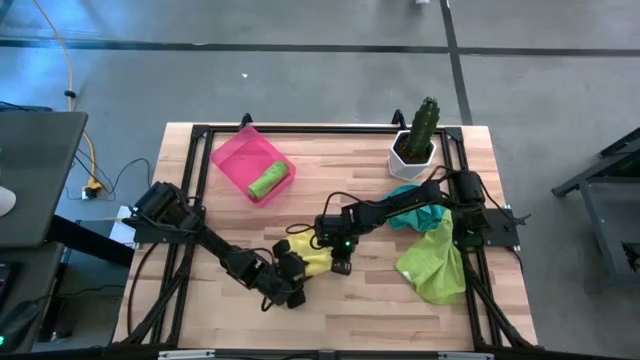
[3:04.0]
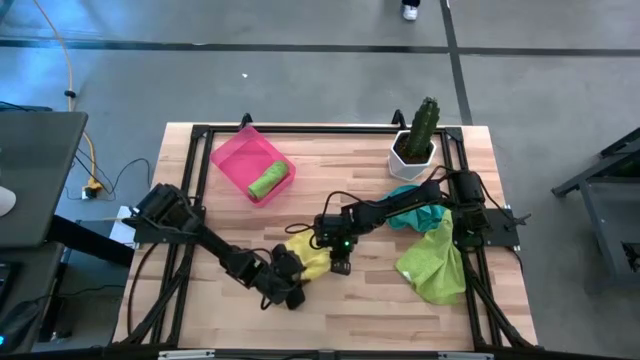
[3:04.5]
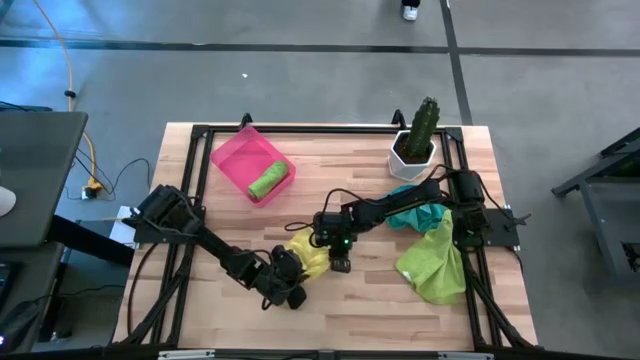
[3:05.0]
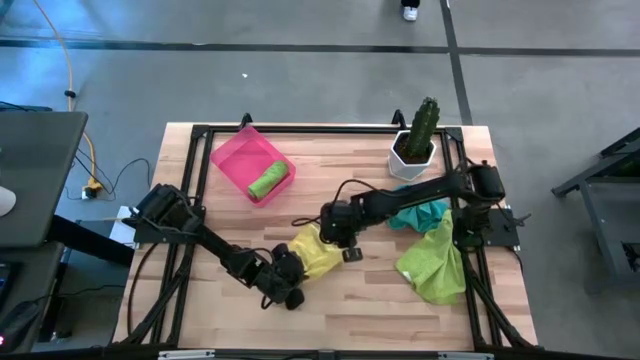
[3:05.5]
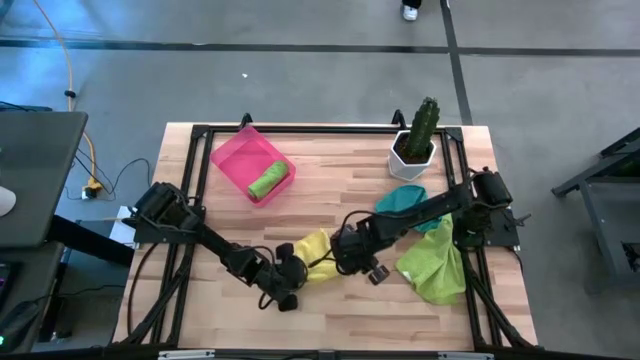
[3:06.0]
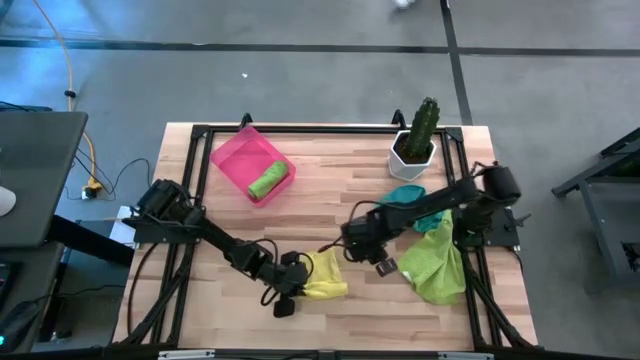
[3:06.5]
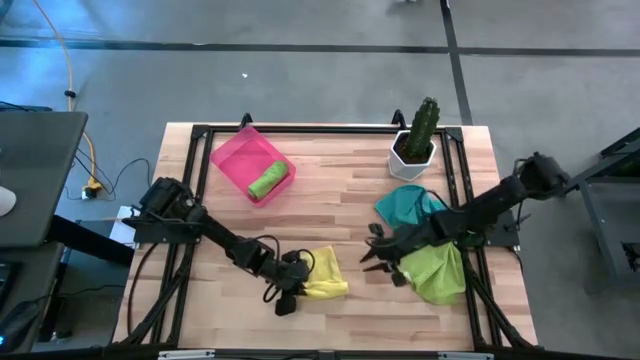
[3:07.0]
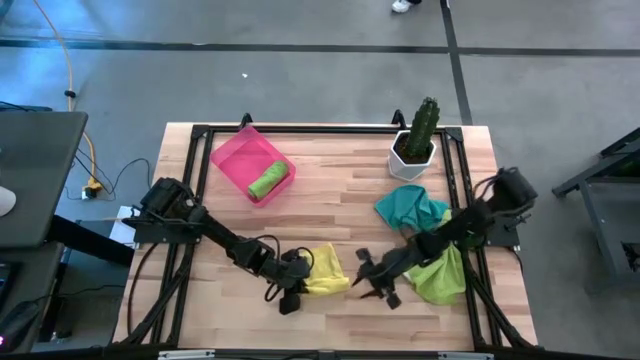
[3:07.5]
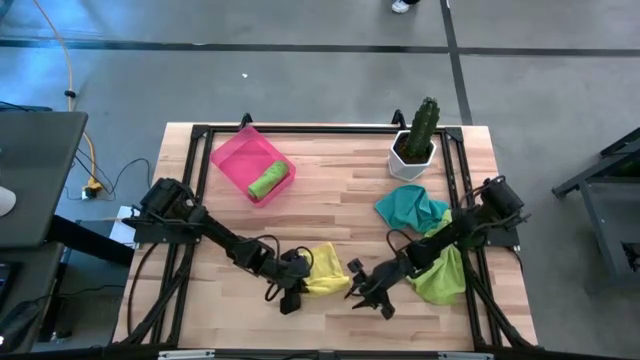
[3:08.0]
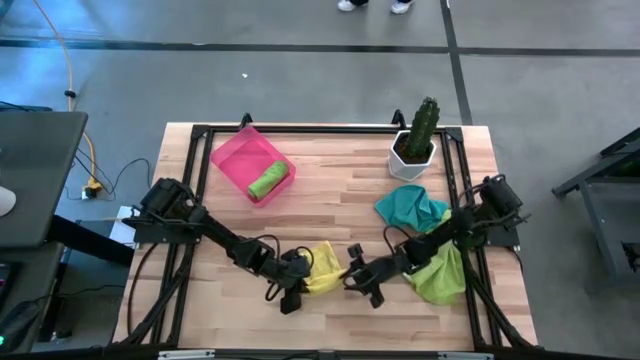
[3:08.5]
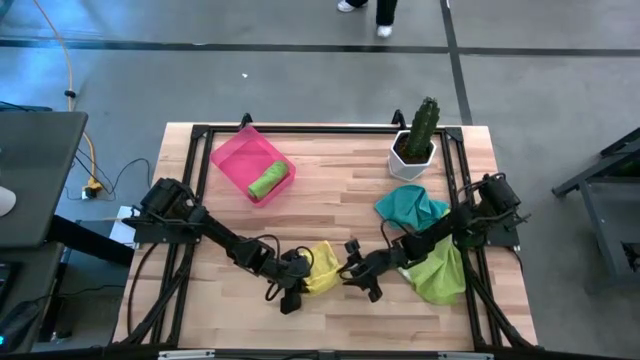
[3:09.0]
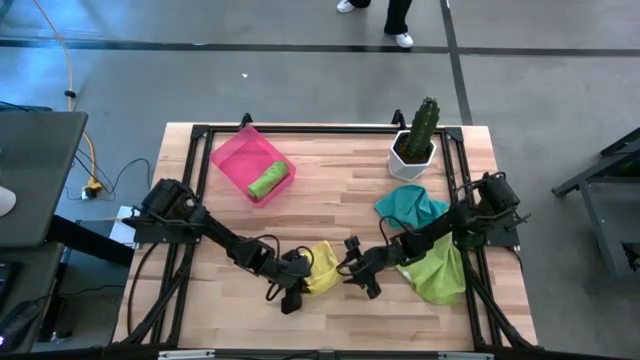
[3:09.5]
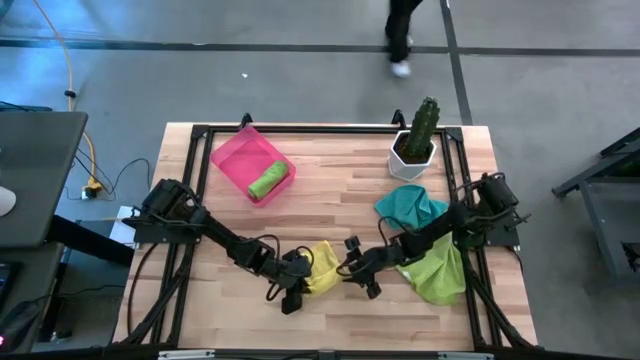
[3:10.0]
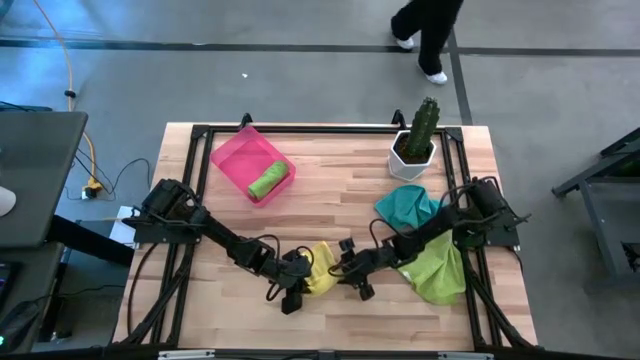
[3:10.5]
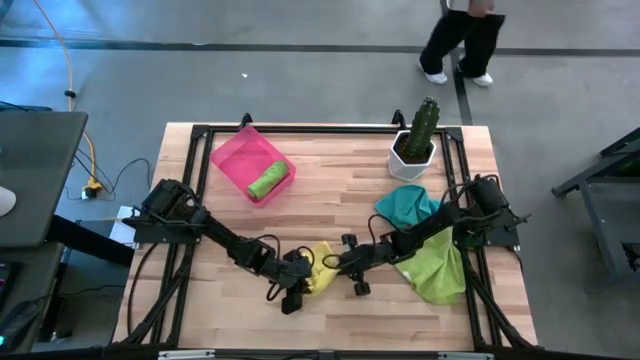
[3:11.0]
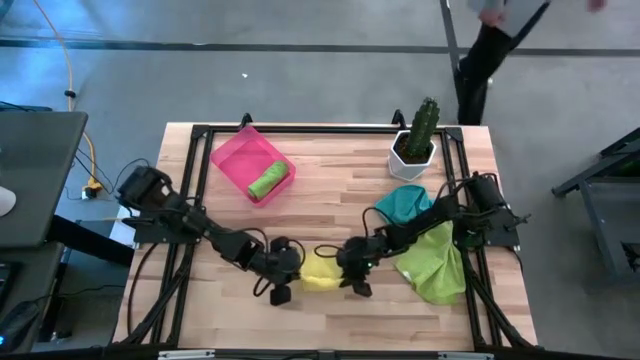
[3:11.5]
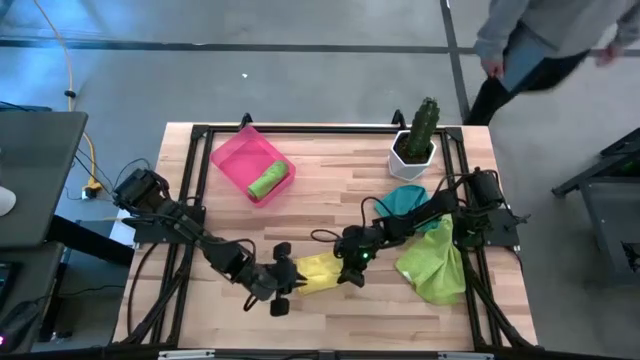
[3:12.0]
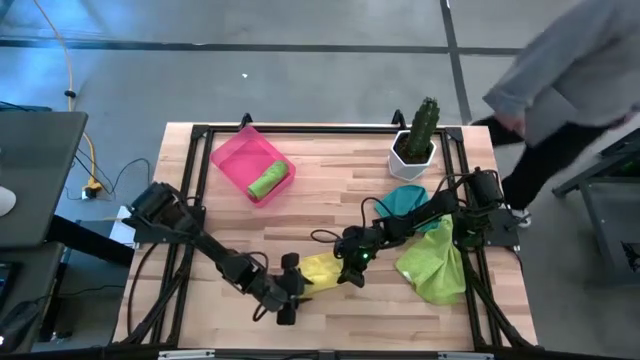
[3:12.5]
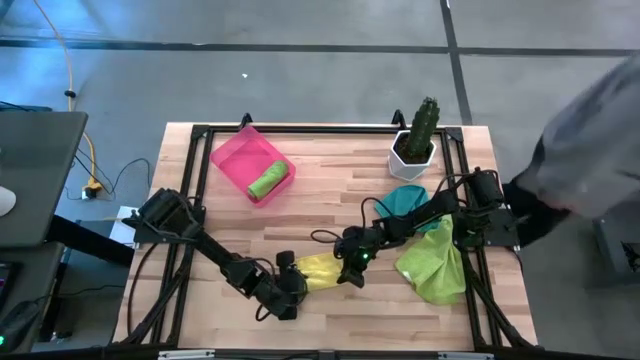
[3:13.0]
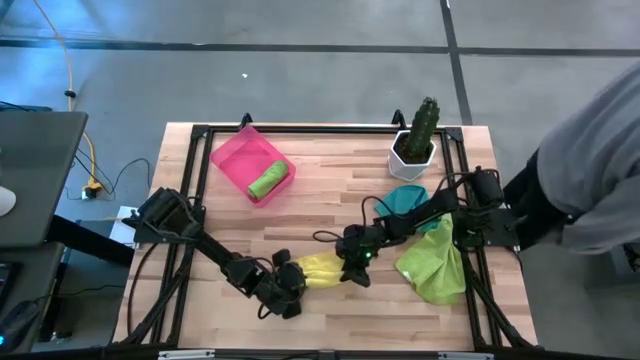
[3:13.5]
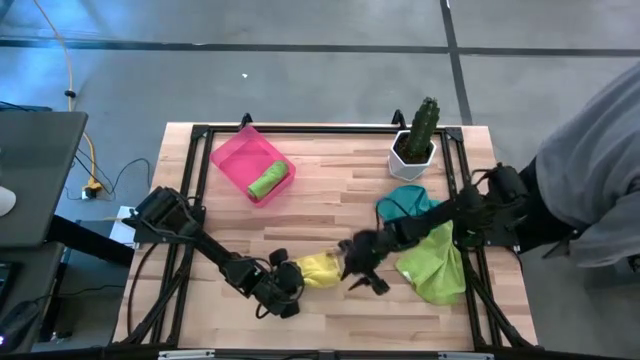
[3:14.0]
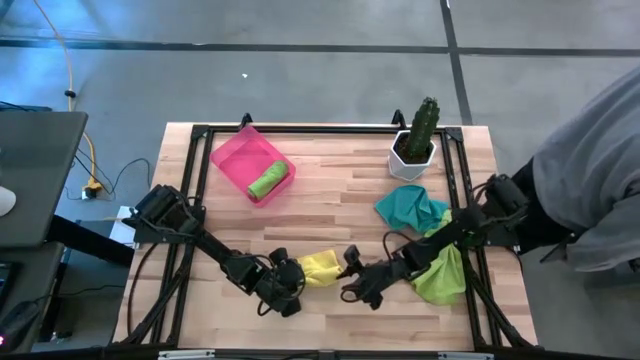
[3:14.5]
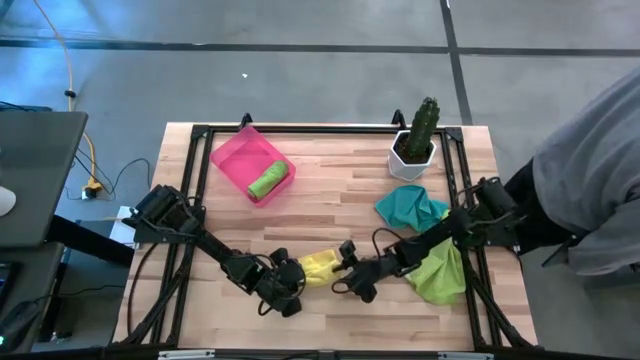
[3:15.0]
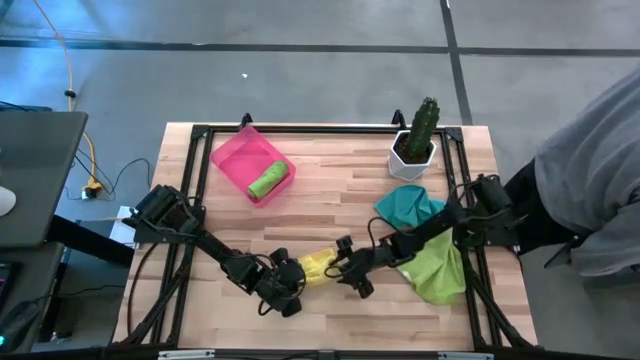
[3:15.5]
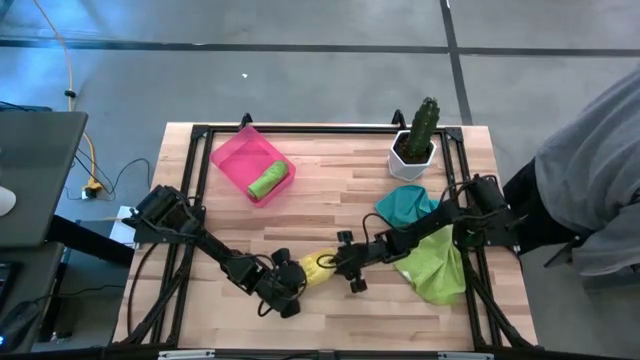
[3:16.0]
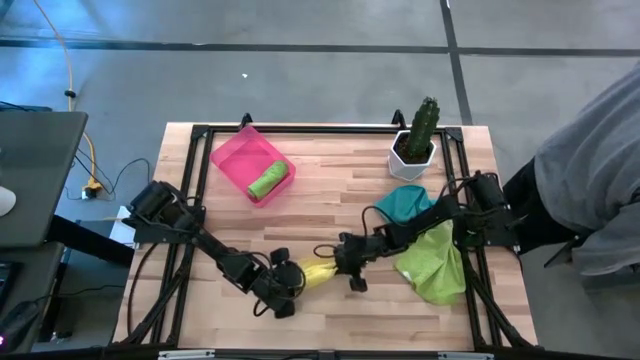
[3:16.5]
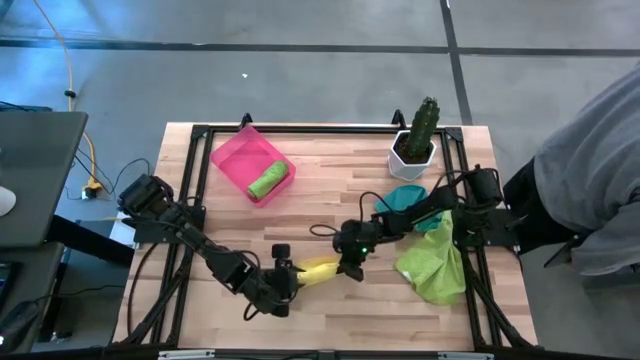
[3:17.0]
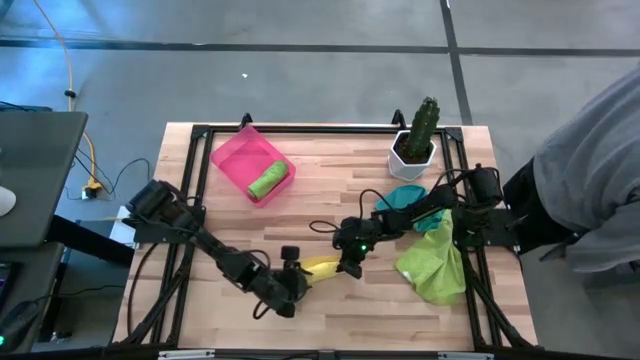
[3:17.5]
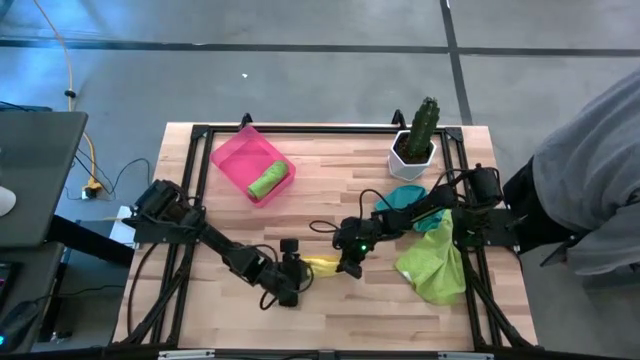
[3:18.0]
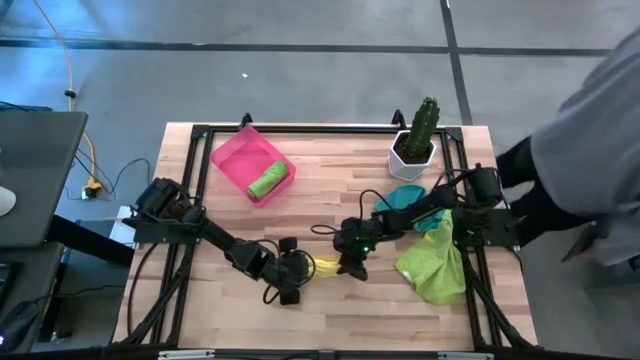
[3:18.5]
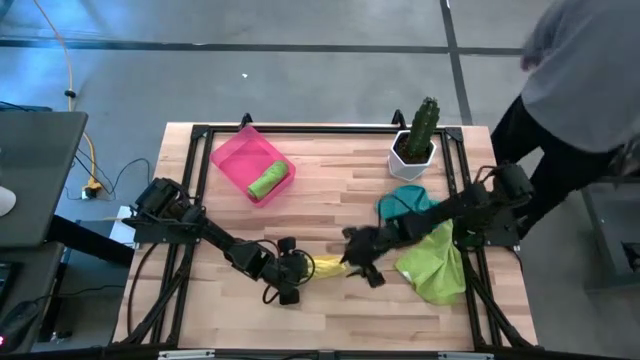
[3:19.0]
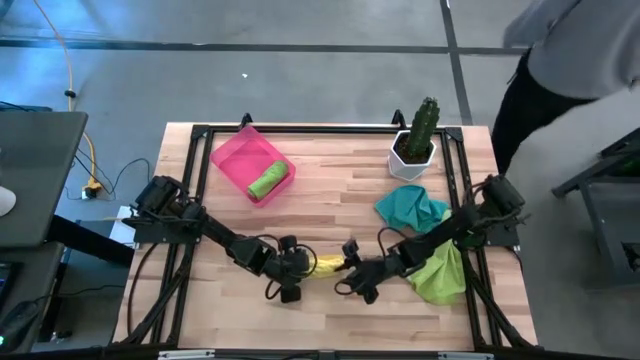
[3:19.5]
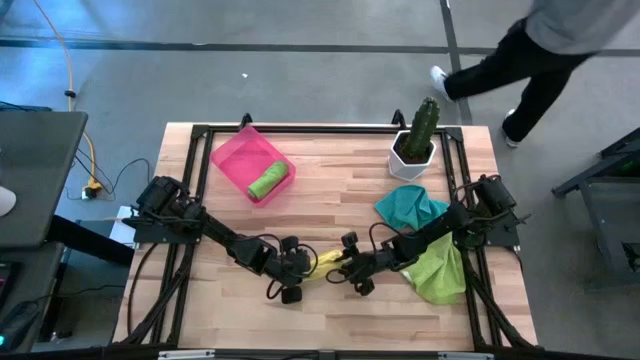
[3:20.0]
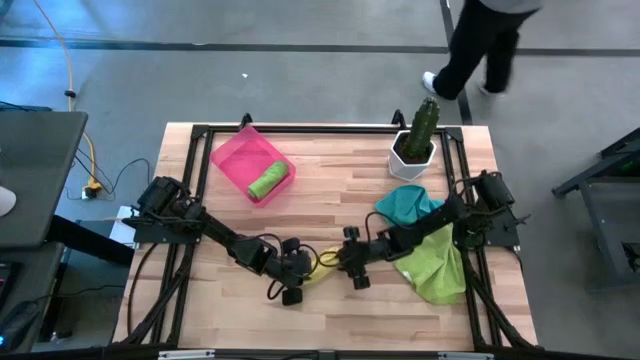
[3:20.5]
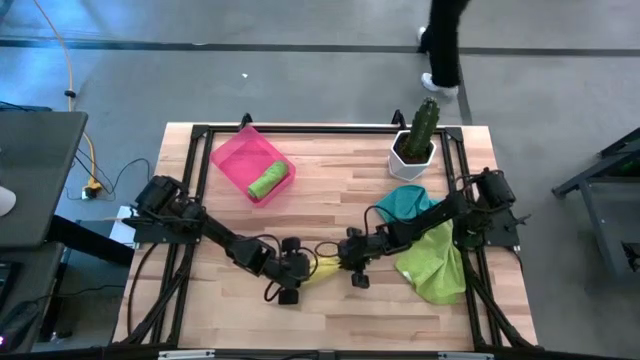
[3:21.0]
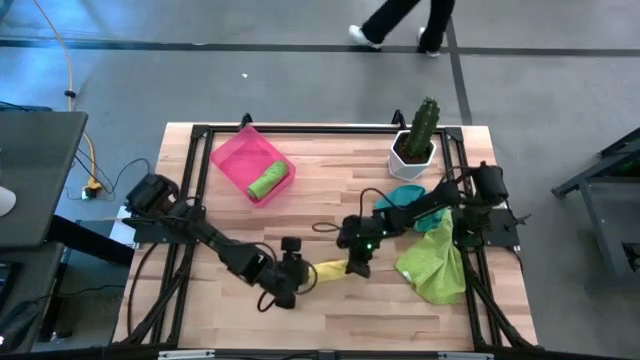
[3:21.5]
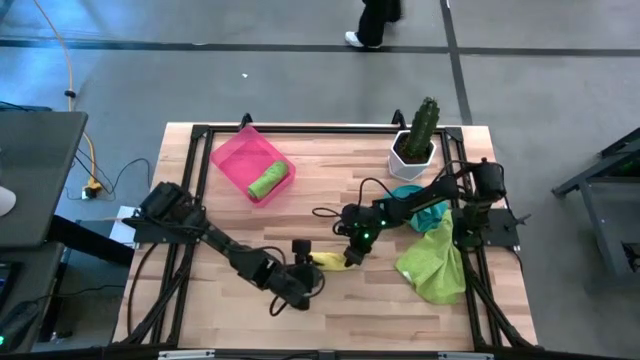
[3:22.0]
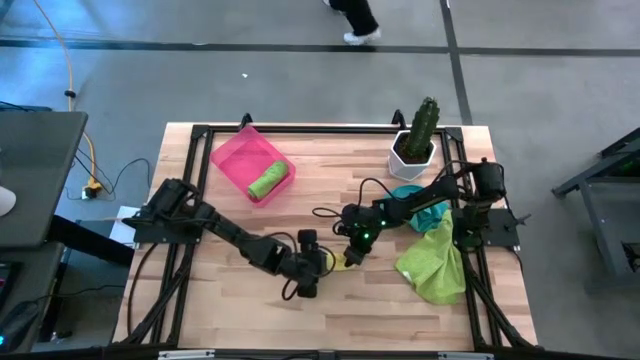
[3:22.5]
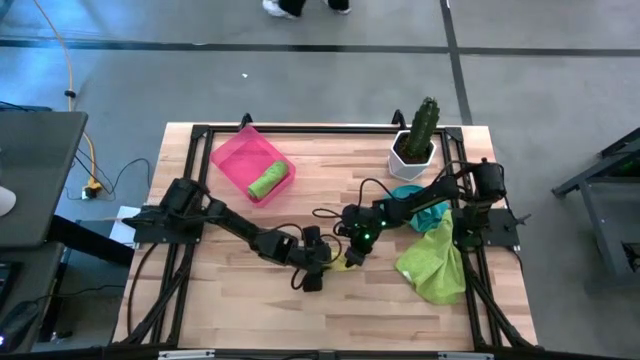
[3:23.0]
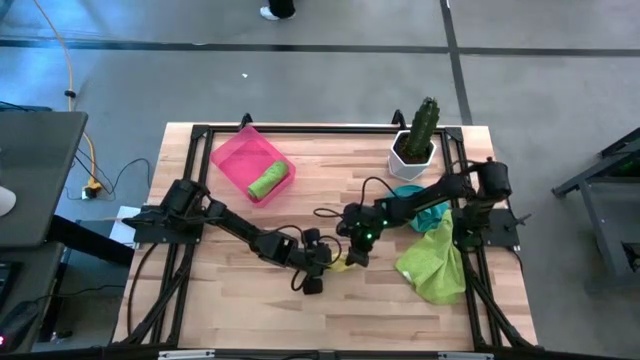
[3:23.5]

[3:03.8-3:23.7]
Task: Roll microfiber towels into tight, uniform cylinder then place into a basket
Roll the yellow microfiber cloth

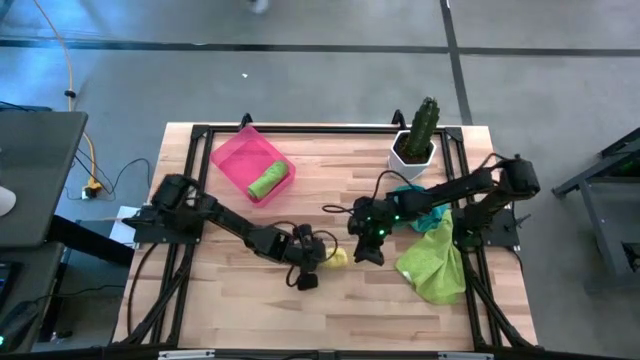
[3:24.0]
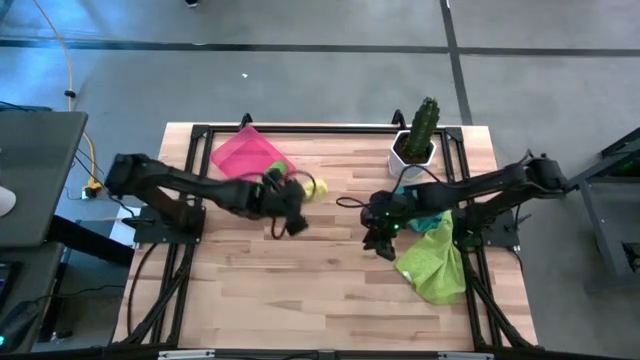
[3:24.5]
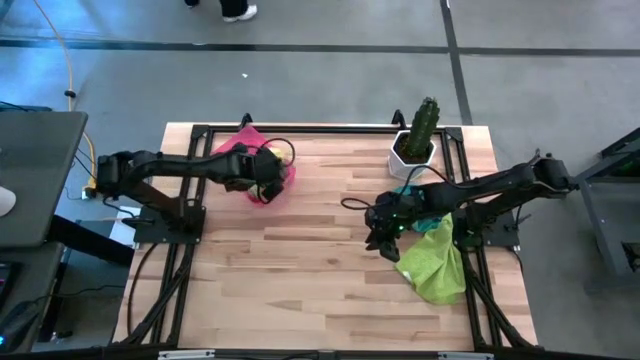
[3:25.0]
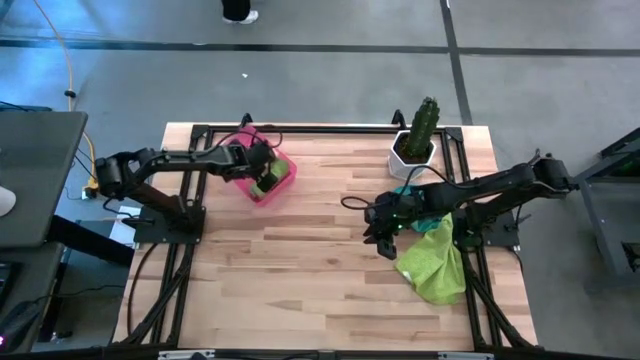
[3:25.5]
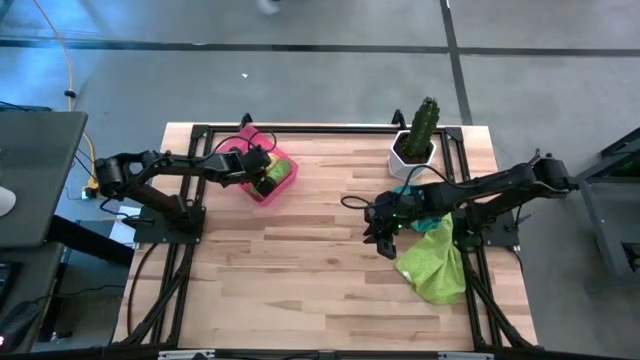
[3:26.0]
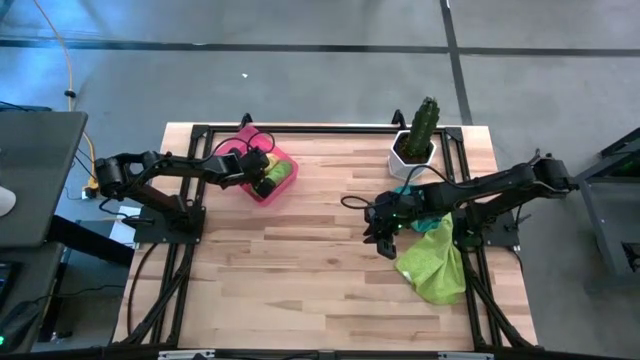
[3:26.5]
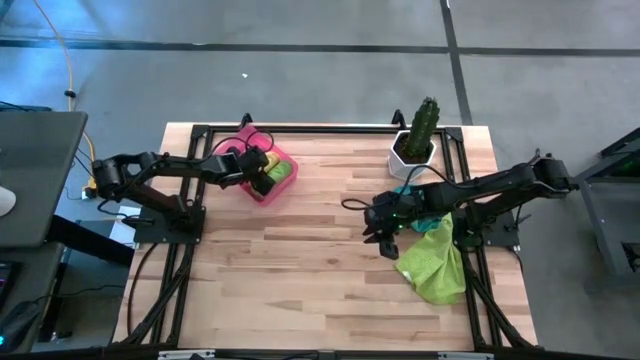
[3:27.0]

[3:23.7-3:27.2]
Put the rolled yellow microfiber cloth into the pink bin
